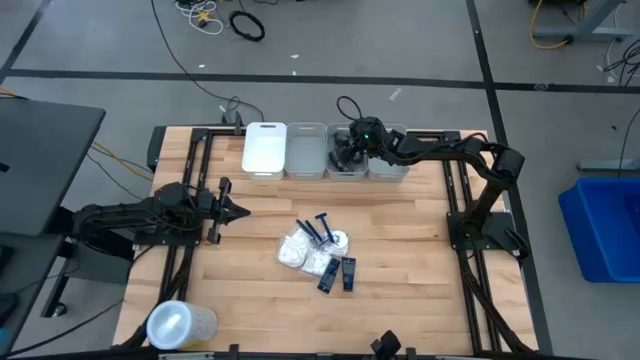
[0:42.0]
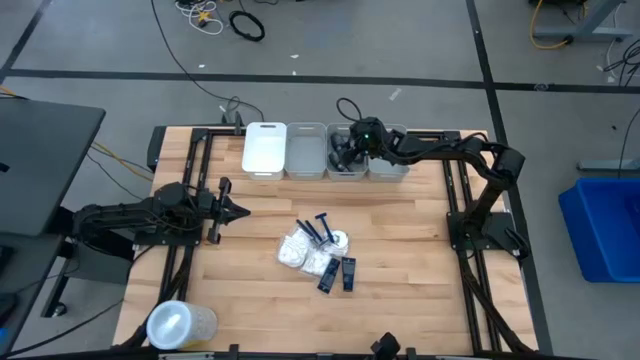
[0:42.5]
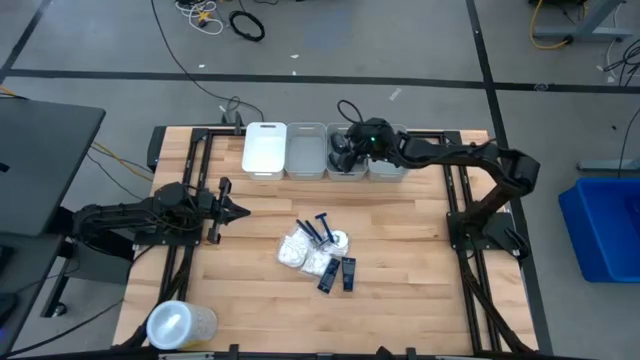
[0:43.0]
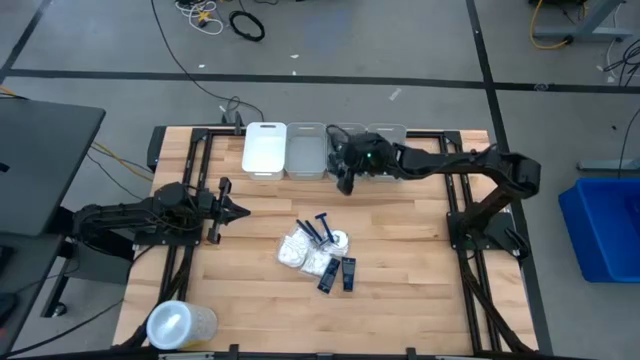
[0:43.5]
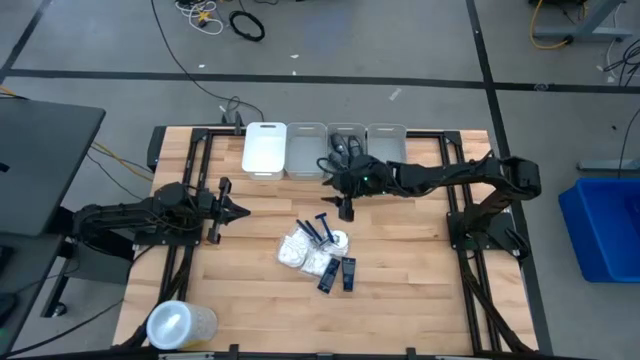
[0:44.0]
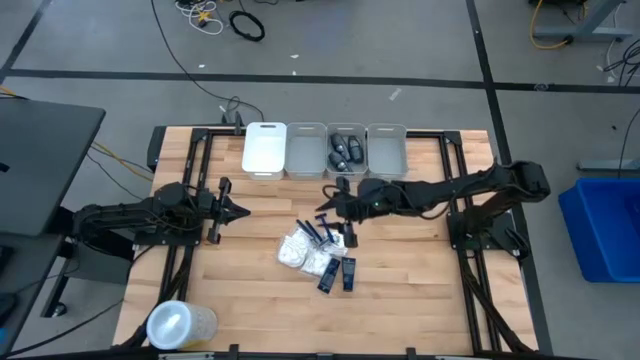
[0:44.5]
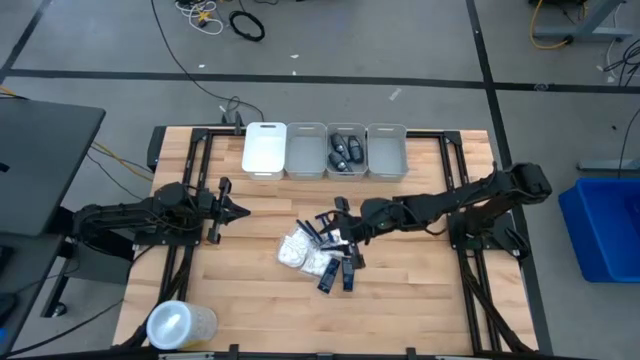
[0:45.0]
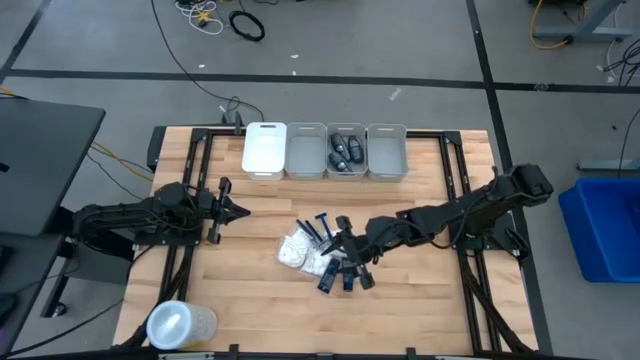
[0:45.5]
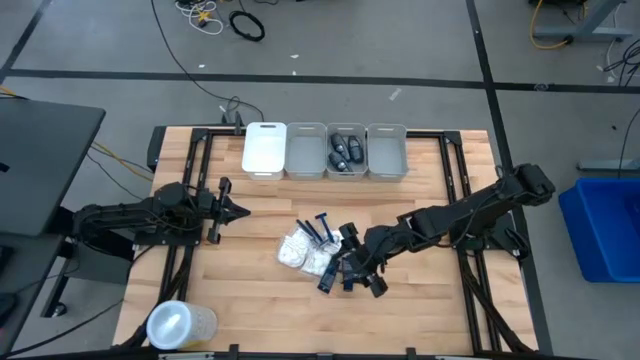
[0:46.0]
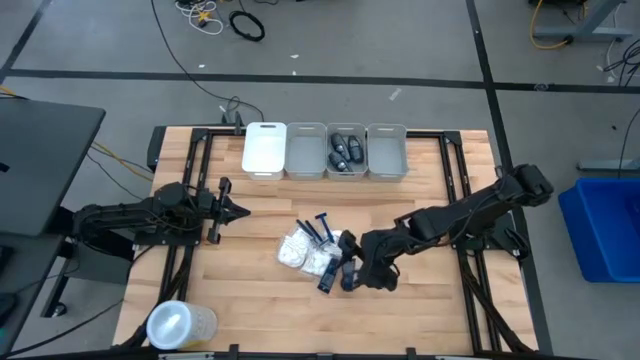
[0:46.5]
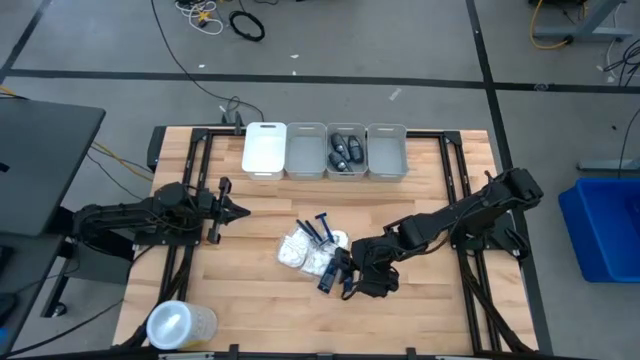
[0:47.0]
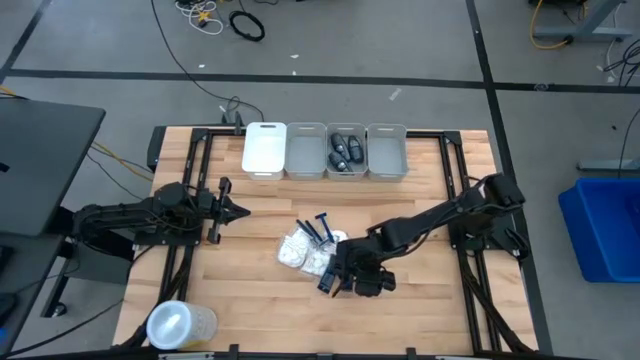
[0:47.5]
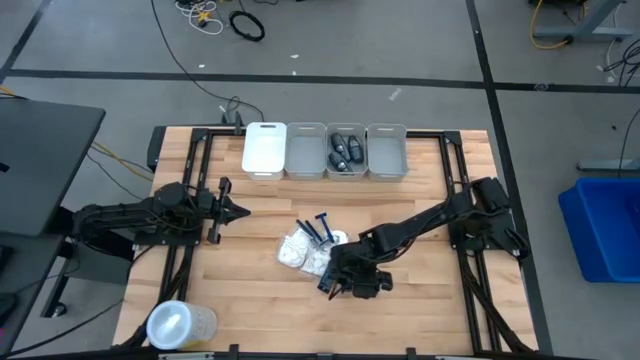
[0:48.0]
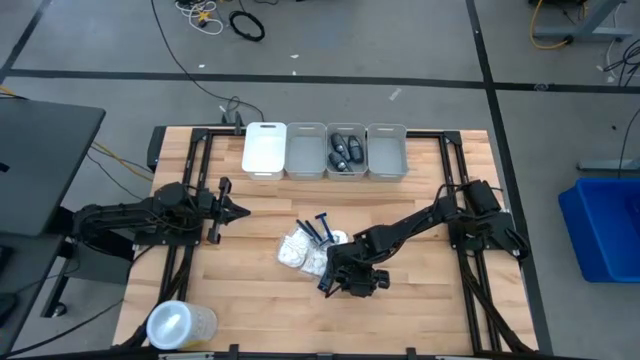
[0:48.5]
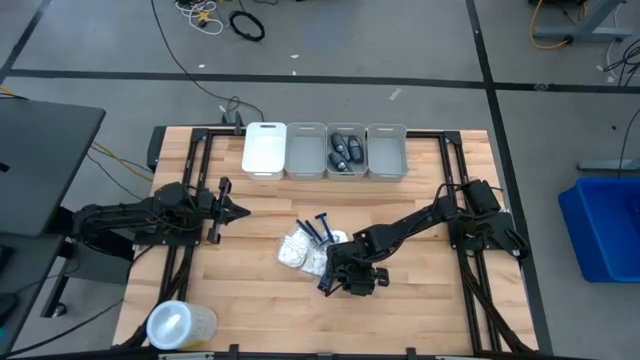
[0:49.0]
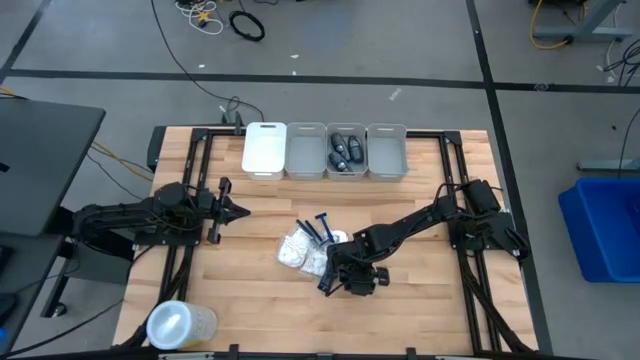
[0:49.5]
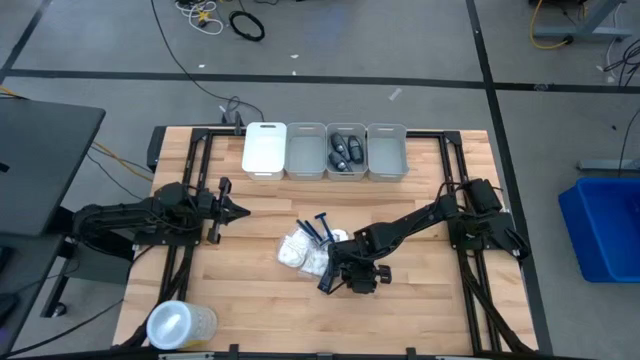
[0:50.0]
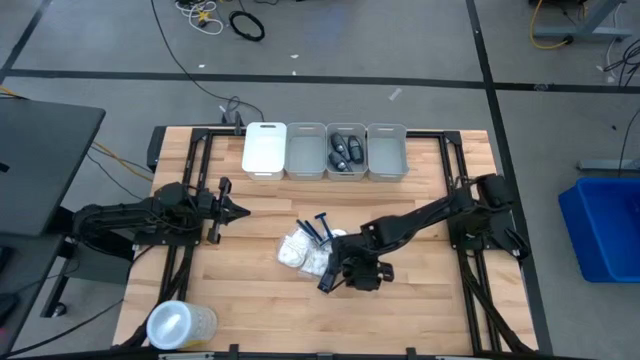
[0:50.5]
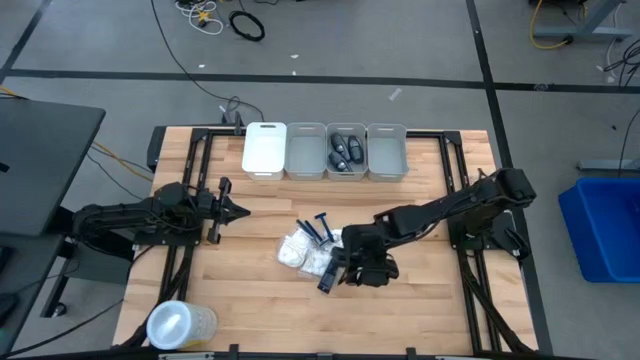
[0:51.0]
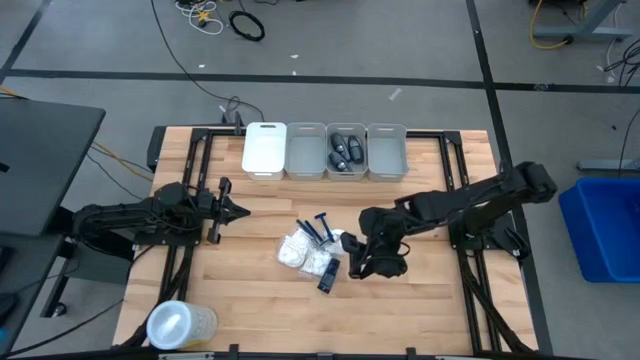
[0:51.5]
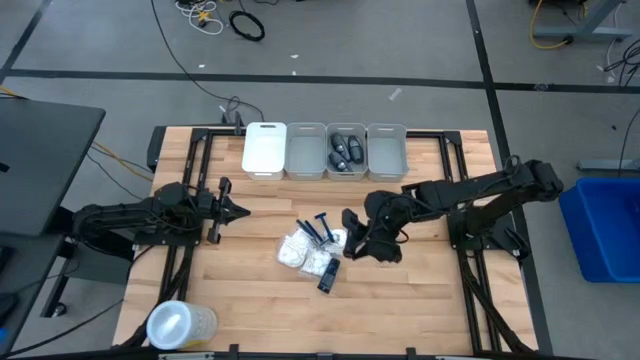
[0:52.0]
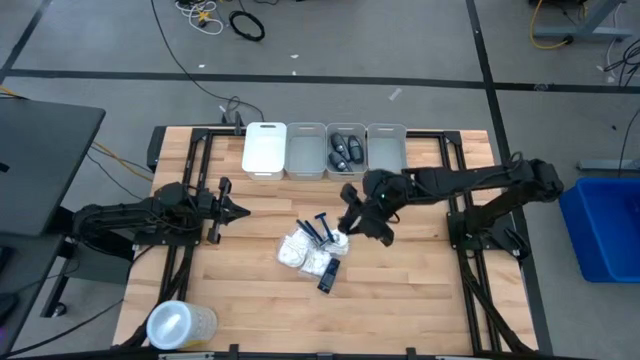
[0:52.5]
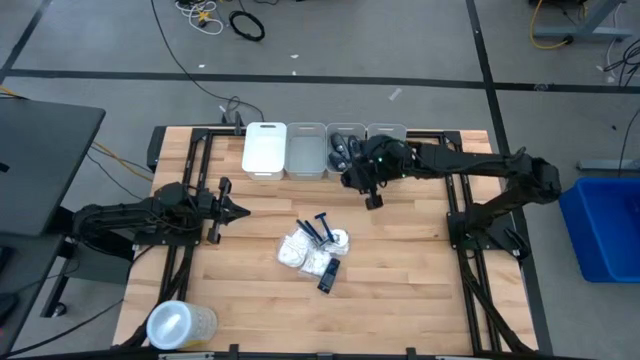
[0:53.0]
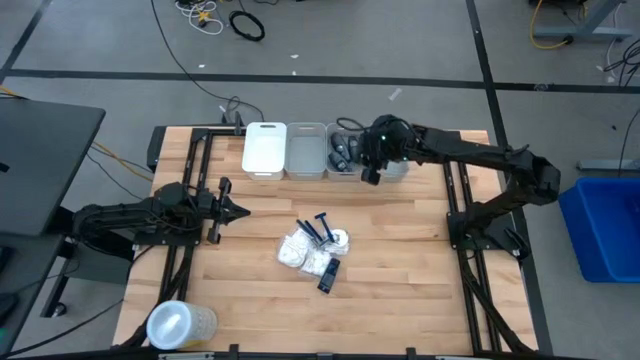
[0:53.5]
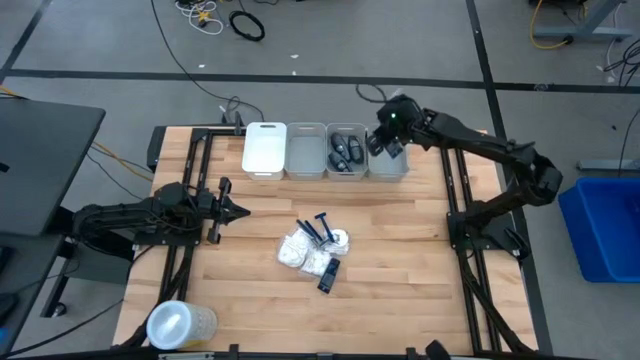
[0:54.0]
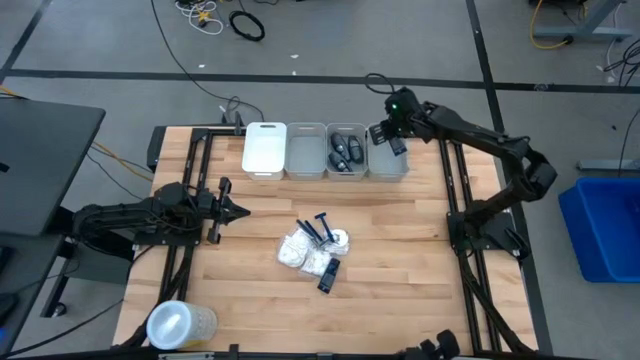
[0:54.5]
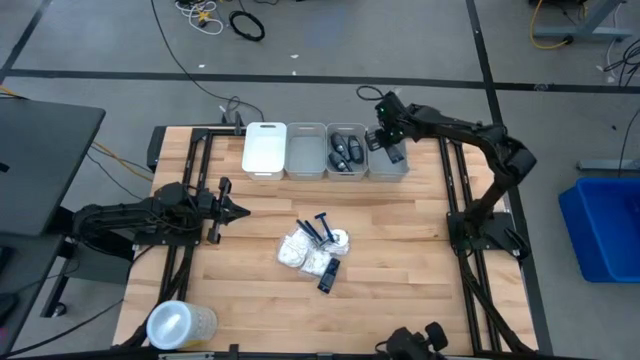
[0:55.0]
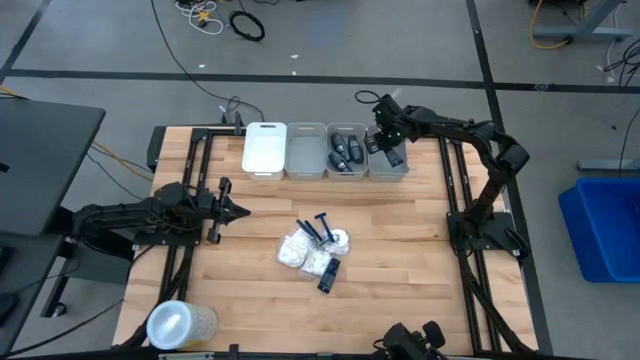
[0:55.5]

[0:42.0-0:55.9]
Task: Pick & Place Travel size toiletries
Put the blue shave cream into the right gray bin

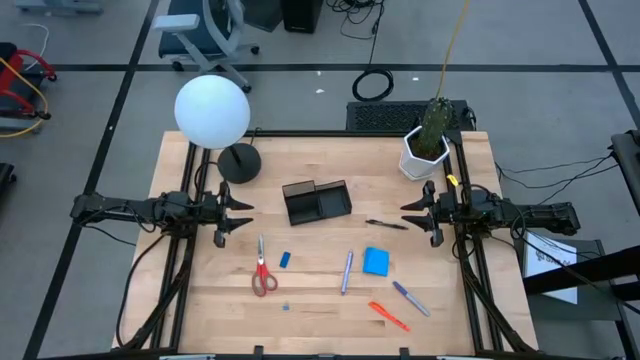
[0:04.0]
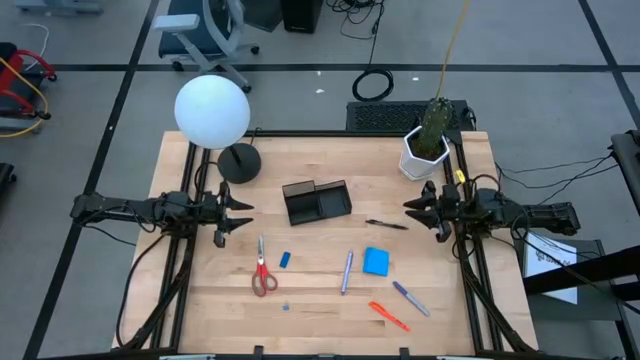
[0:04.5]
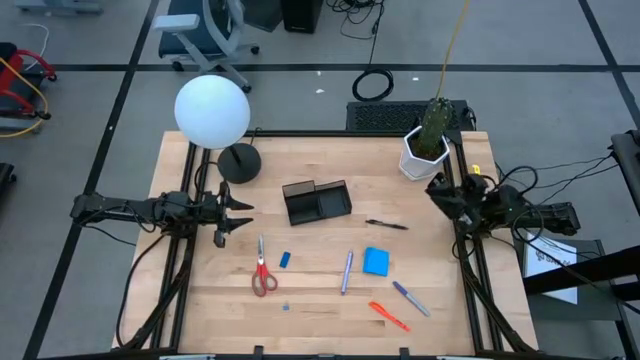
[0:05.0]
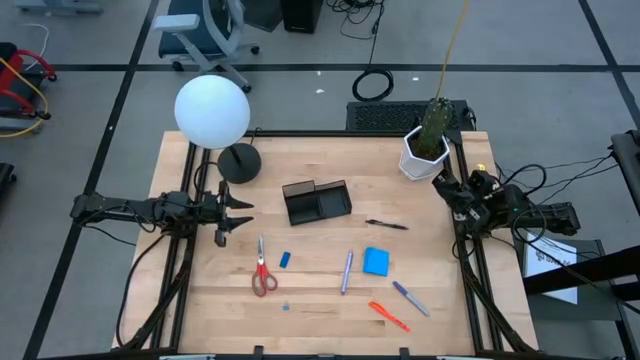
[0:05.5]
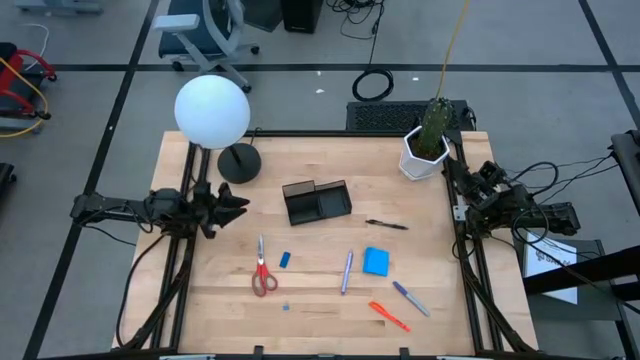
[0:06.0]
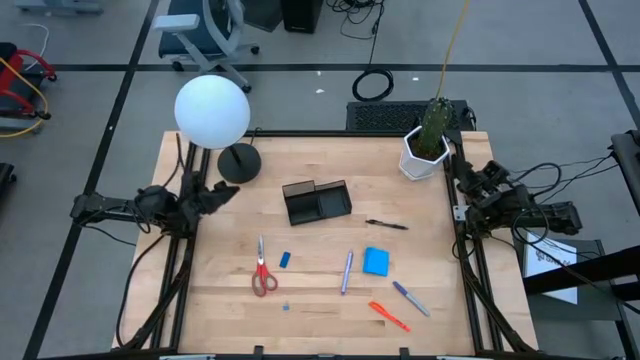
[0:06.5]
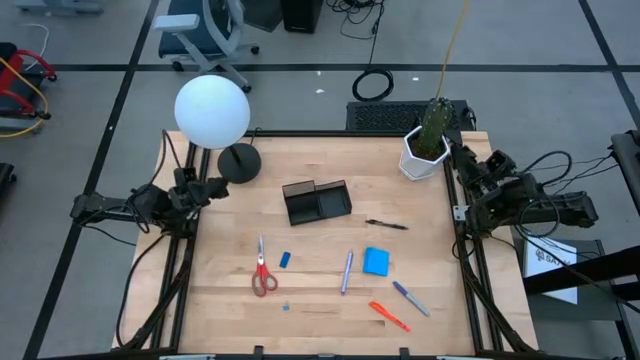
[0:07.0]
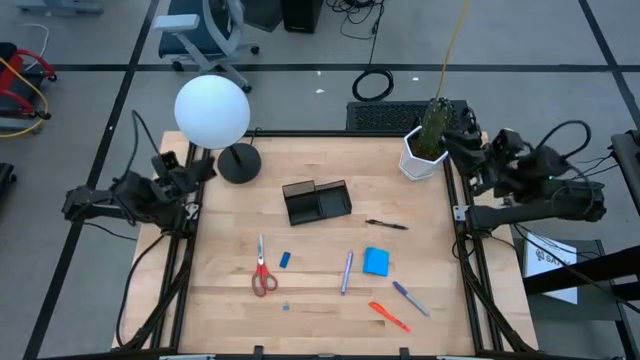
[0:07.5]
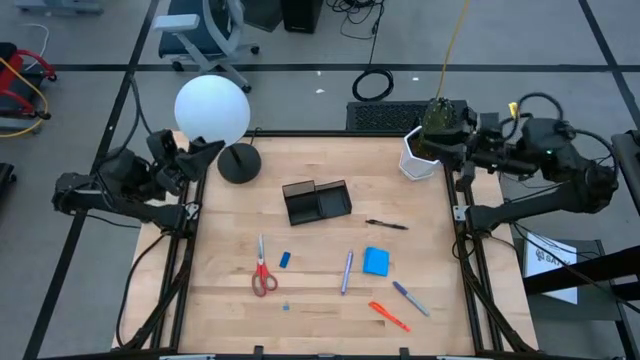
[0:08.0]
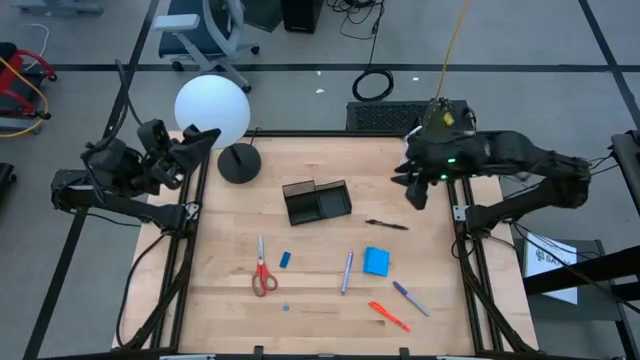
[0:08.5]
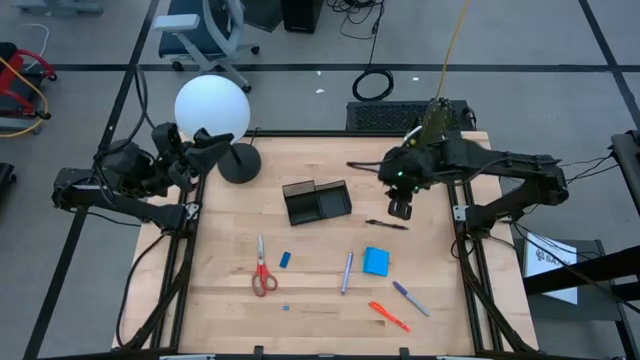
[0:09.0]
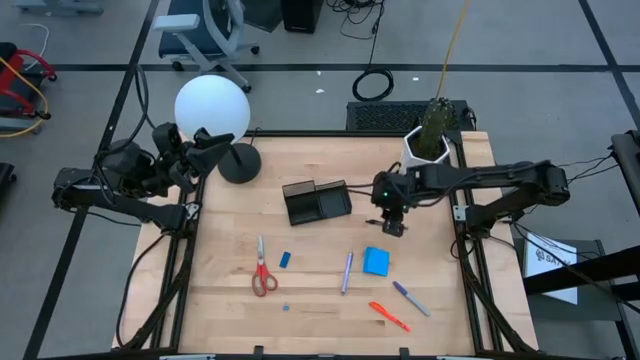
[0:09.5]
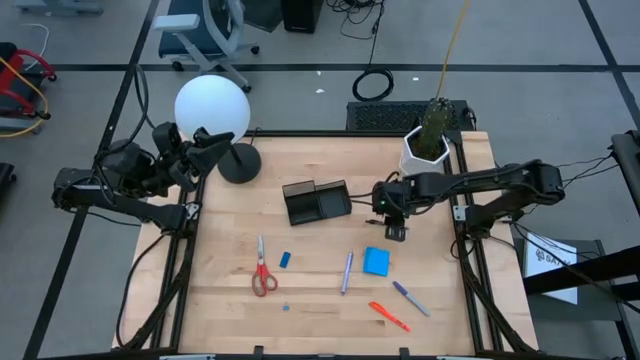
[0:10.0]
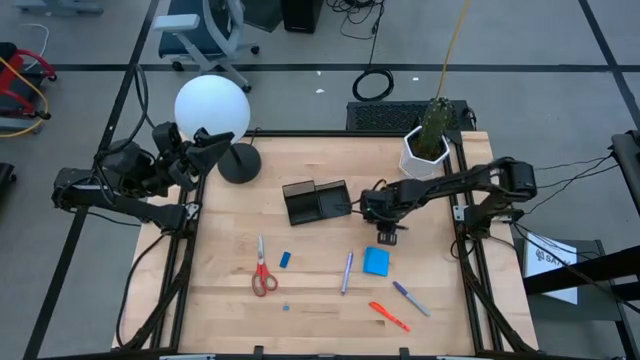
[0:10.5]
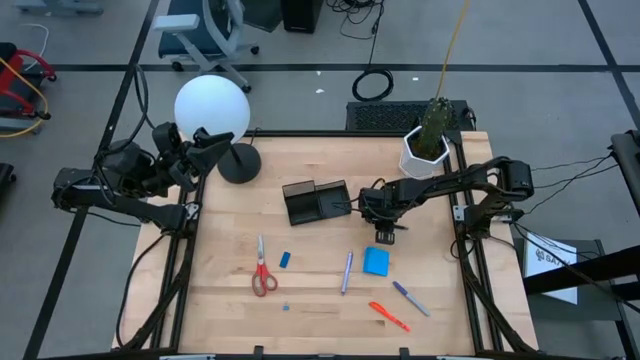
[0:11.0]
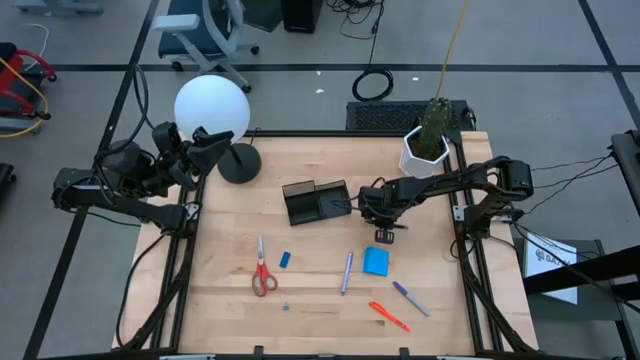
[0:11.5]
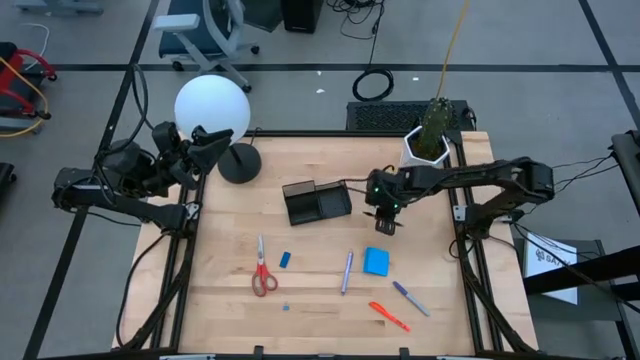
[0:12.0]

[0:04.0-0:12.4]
Task: Pick and place office supplies into organizer
Put the black pen into the black desk organizer
